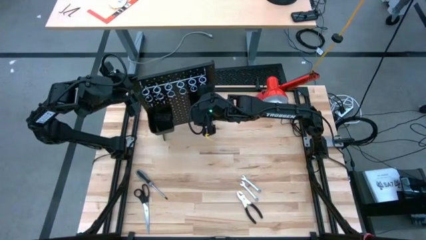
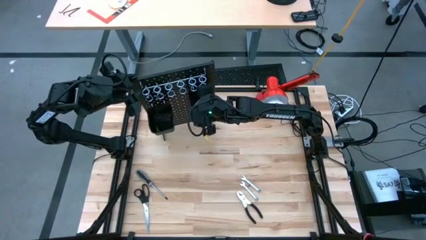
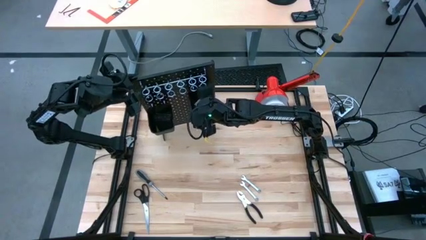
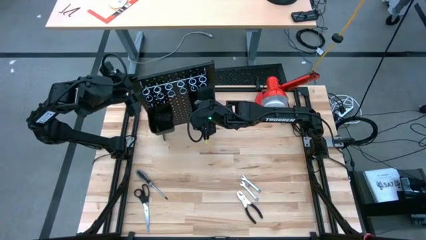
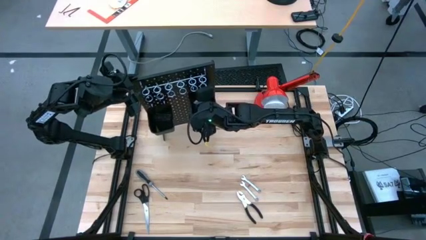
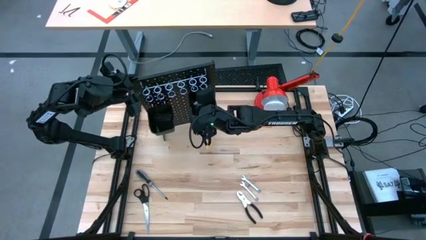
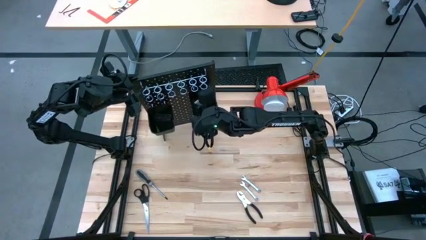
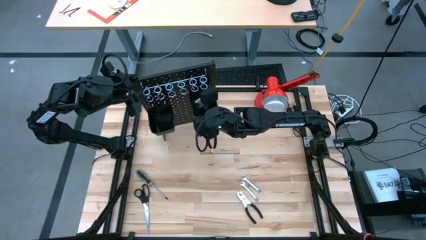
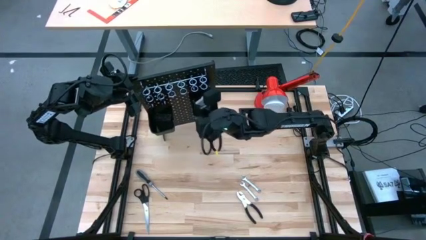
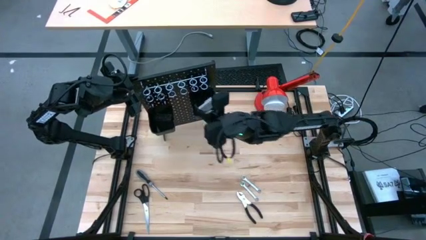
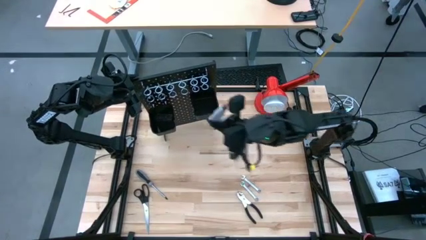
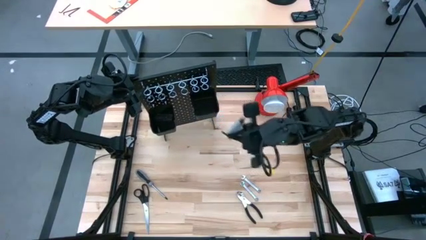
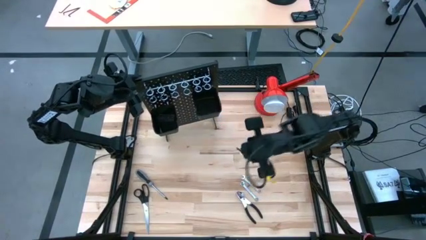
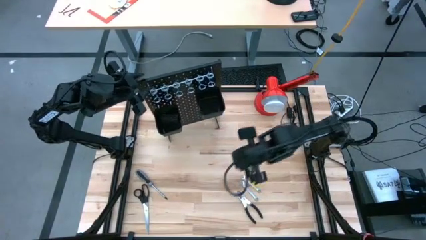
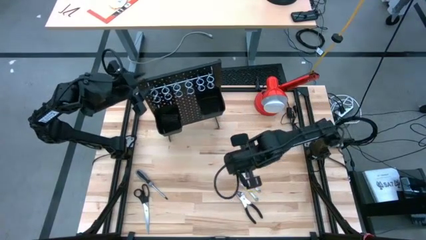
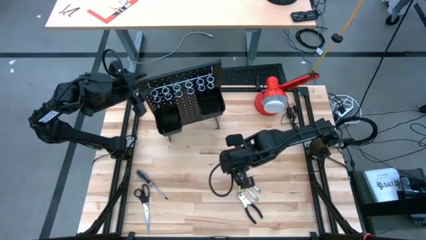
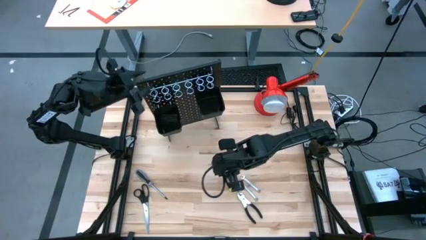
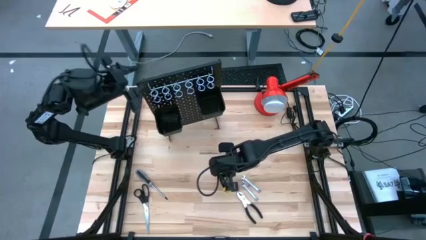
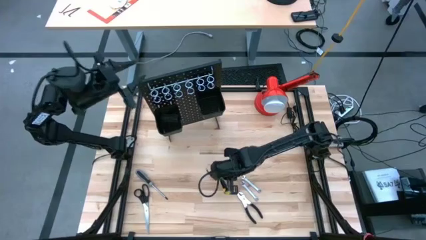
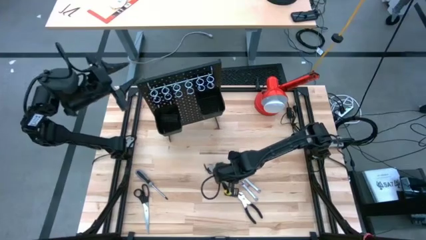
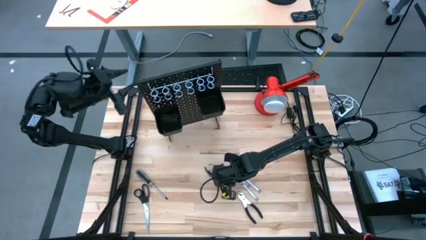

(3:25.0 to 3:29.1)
Task: Hang tools onto peg board
Remove the black allen wrench set from the top black basket on the pegboard to the table

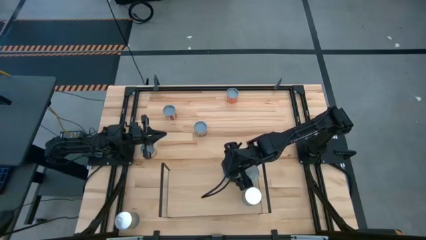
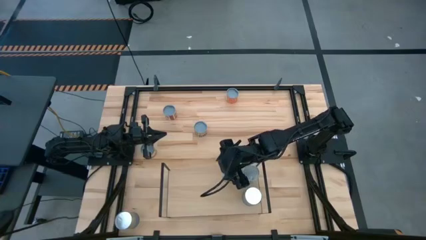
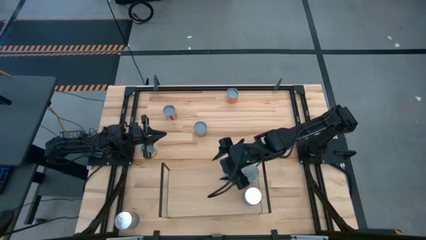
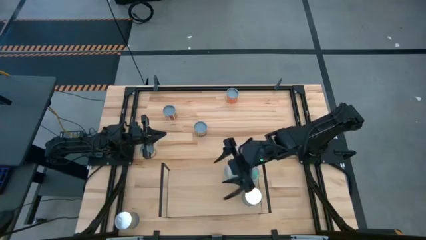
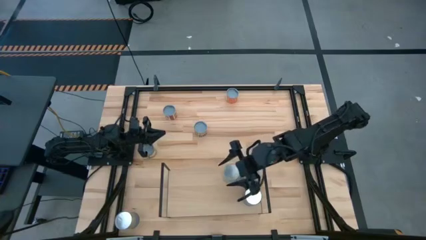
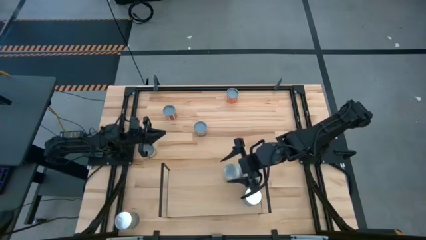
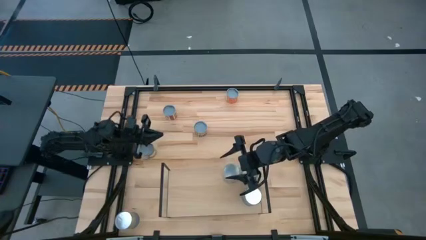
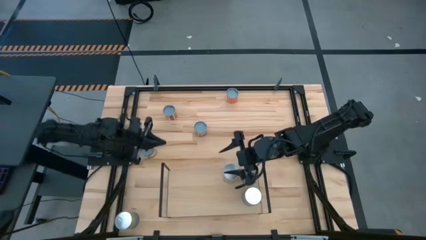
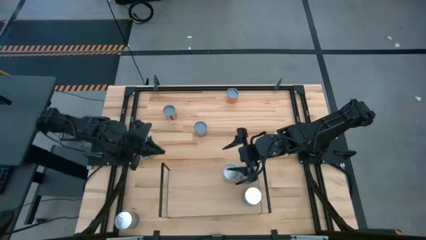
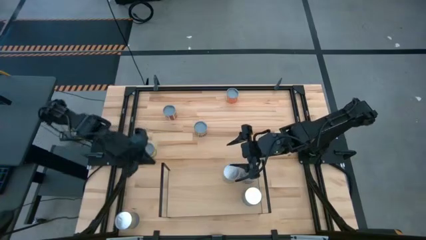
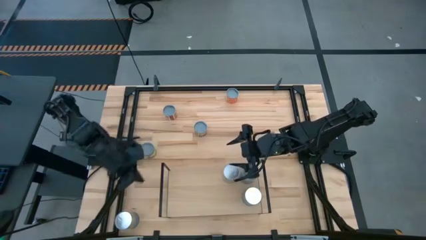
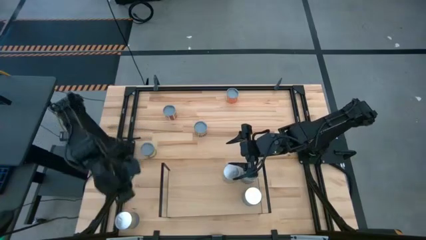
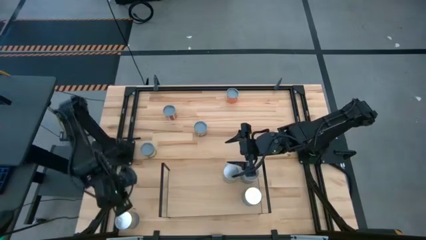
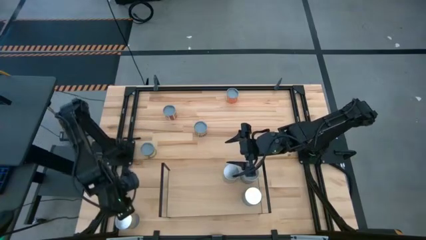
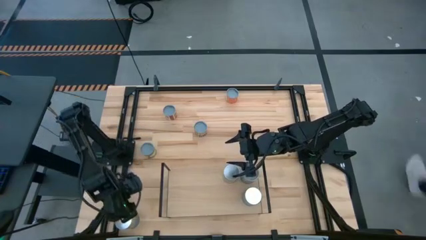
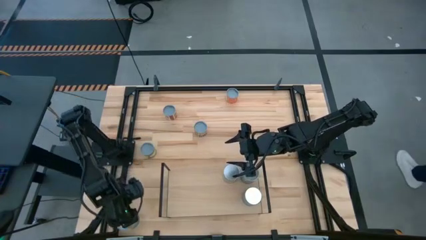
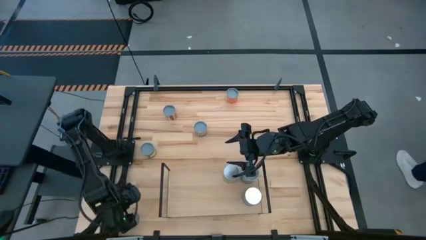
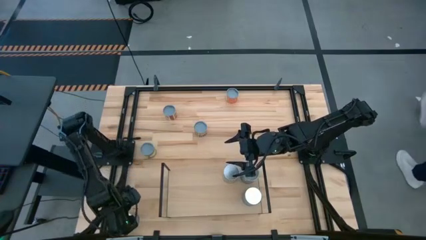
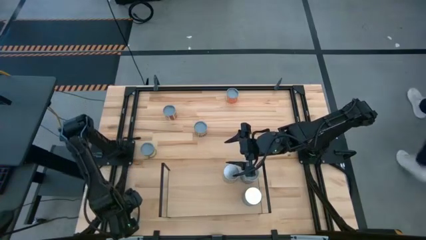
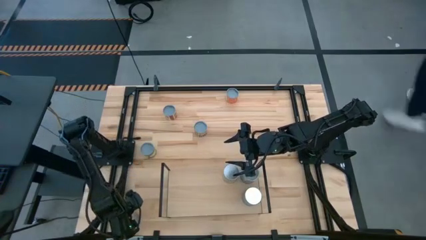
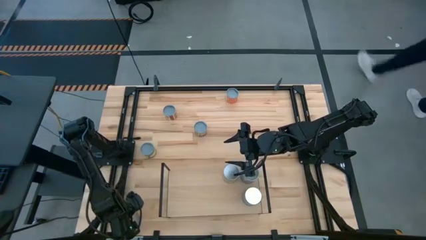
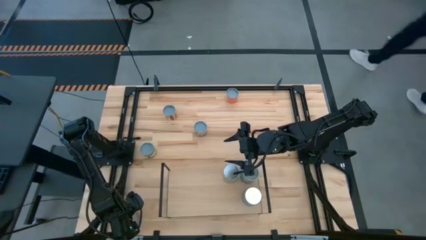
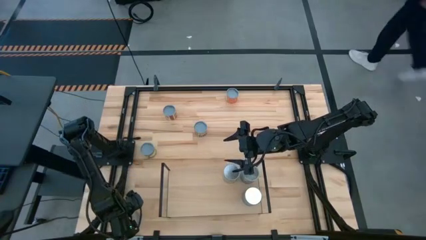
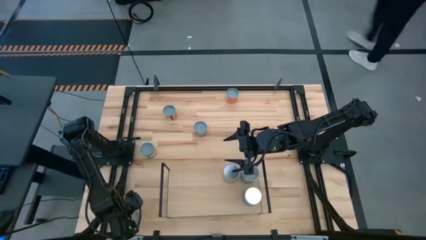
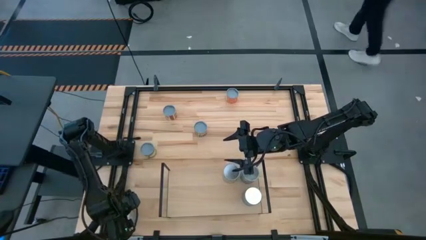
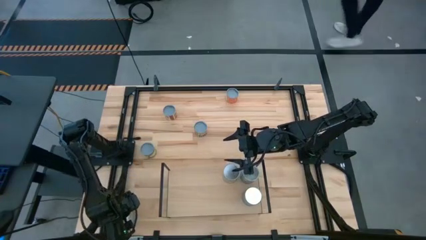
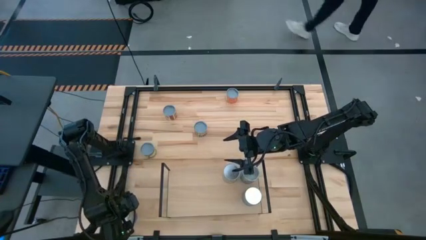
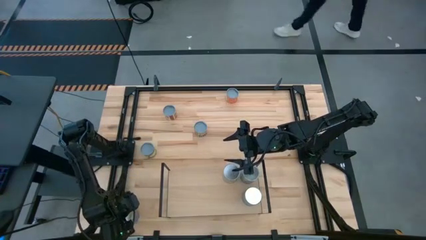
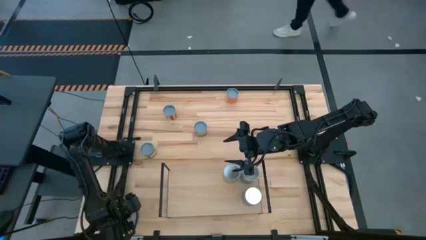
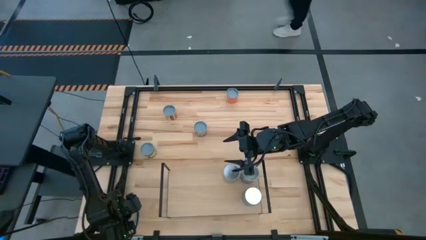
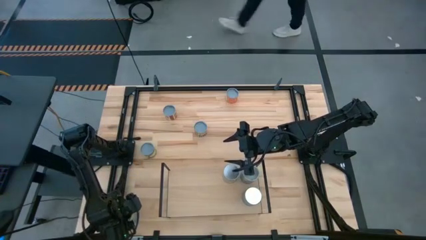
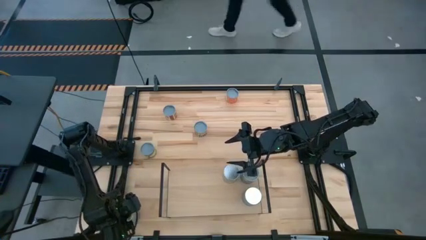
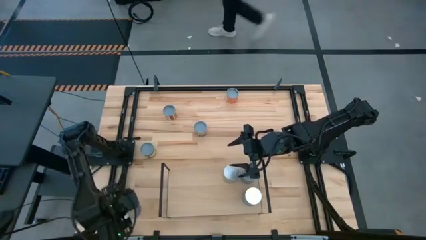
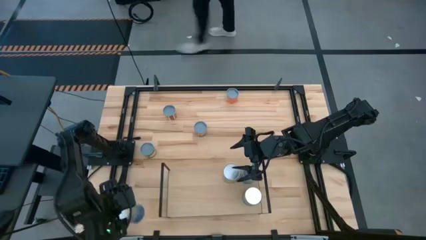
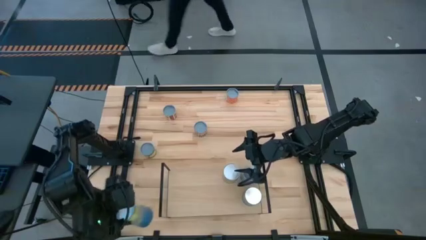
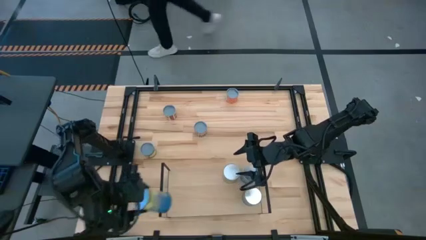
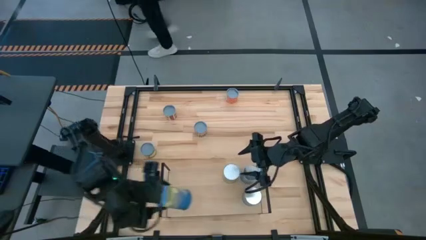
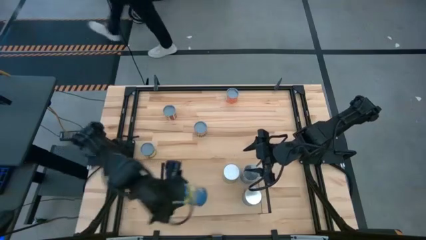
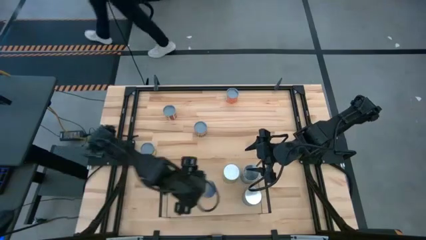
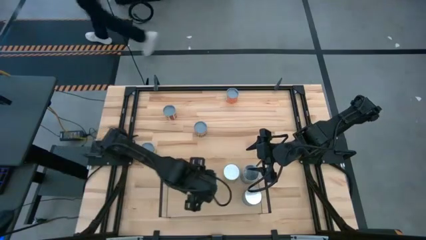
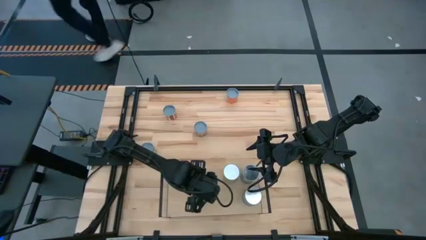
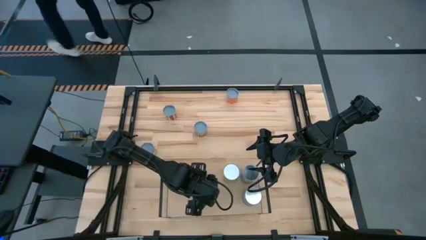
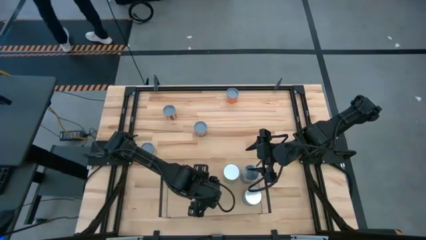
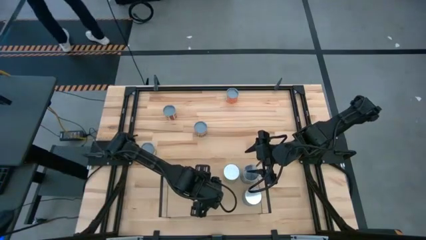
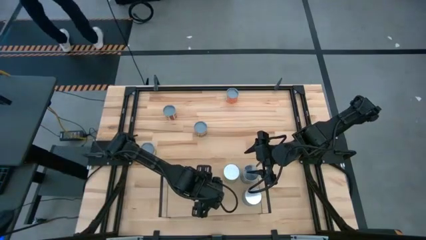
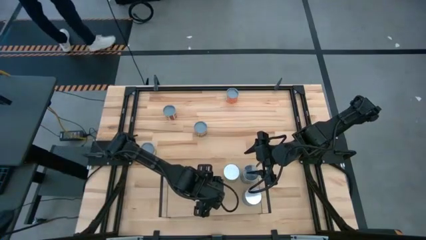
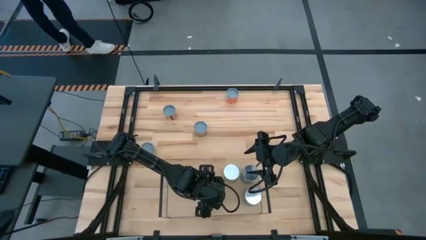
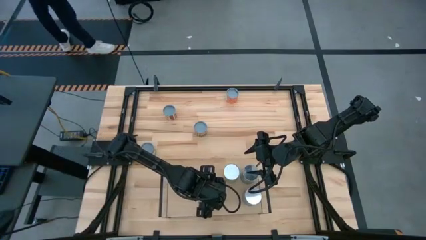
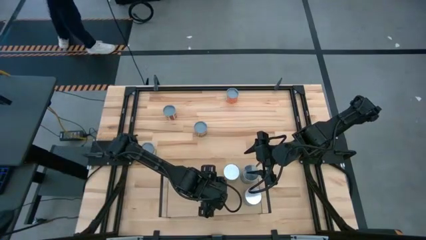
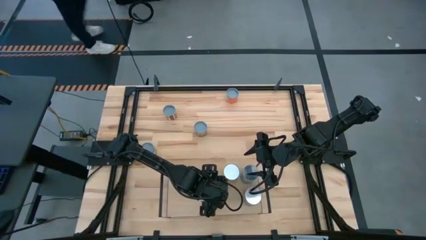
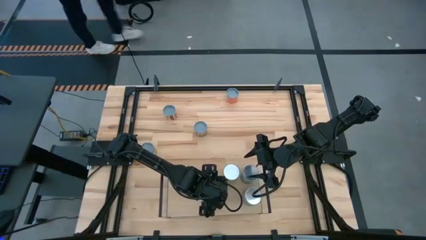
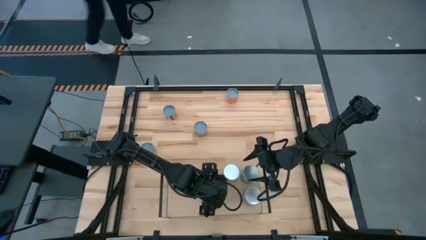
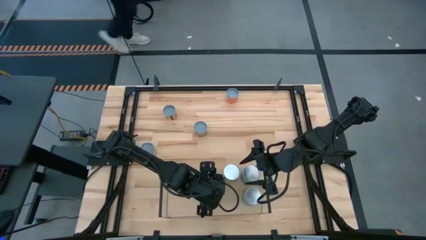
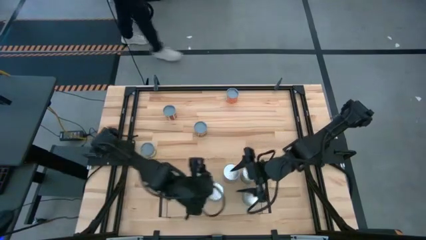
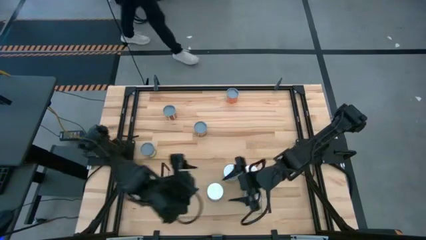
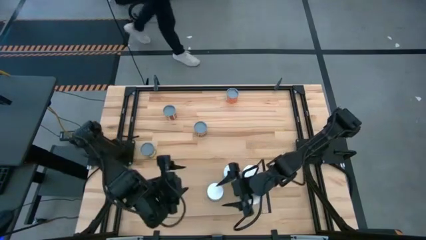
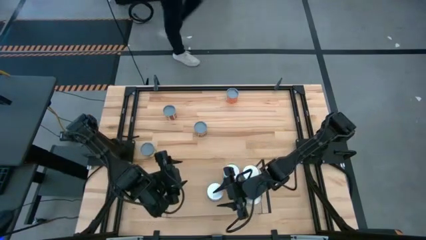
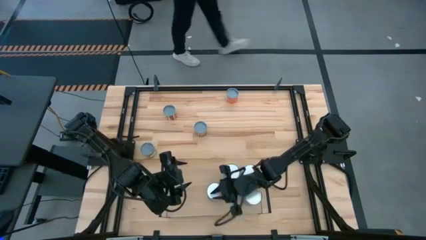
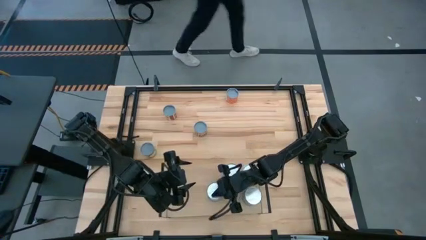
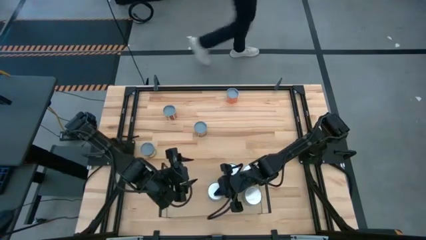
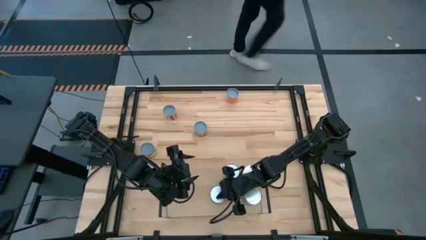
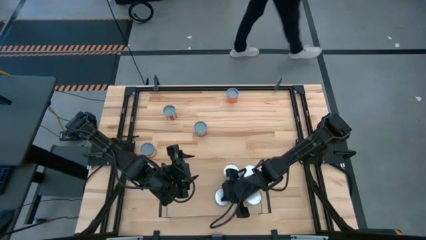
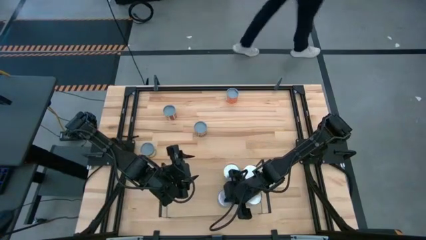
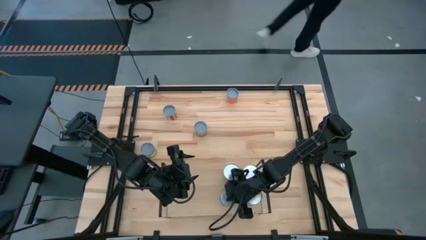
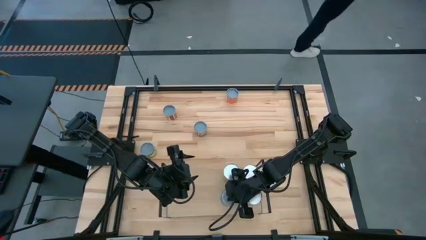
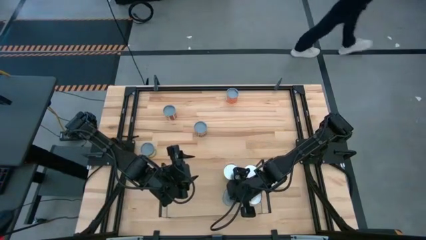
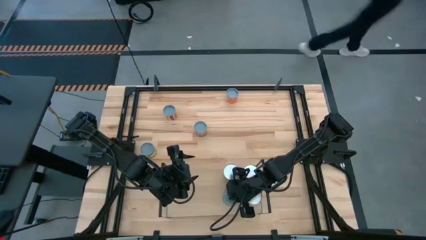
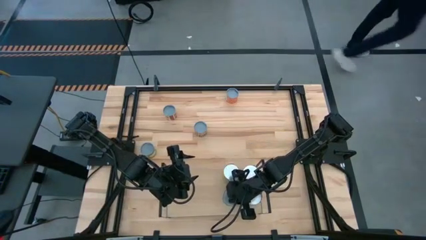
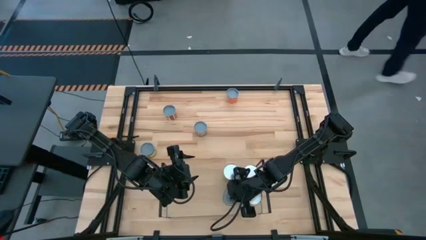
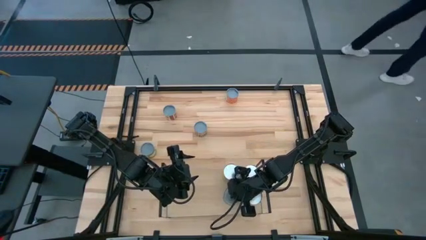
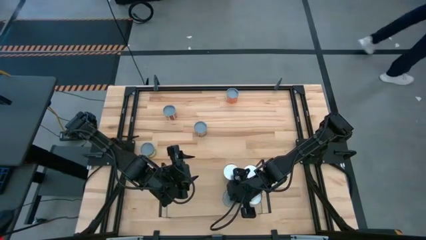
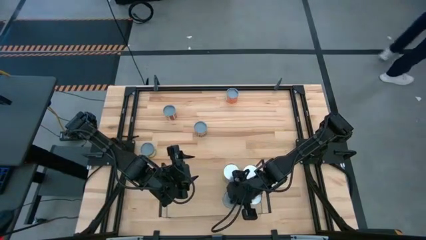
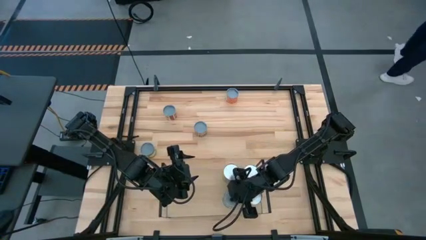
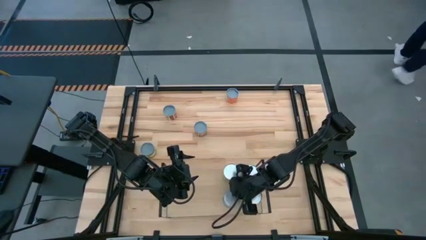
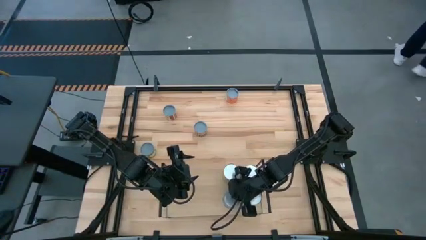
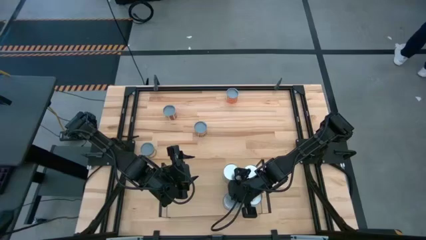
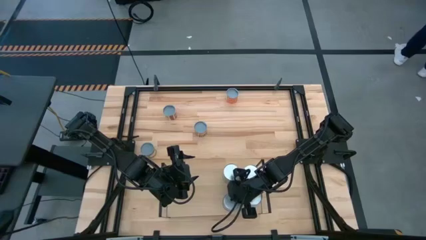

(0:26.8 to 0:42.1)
Task: Pick and place cans onto a shelf
Put the canned peas on the shelf
